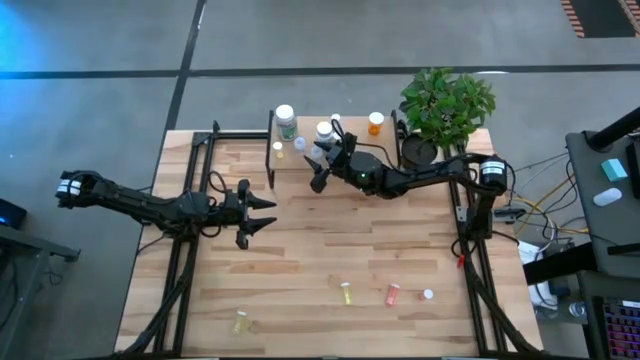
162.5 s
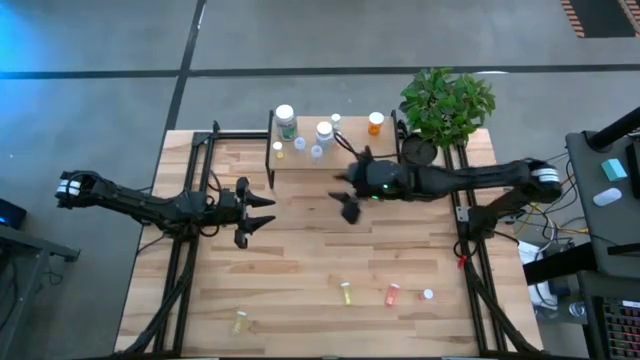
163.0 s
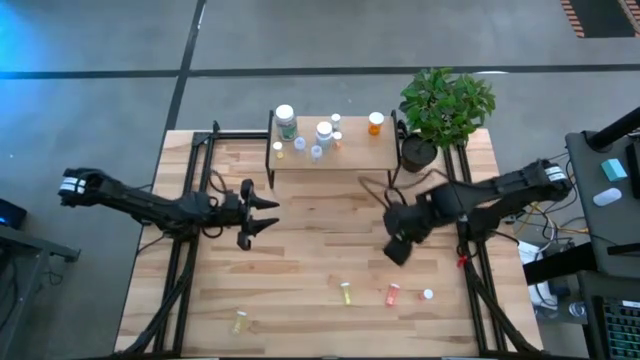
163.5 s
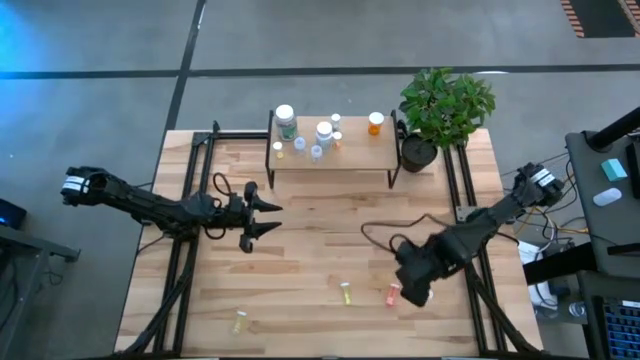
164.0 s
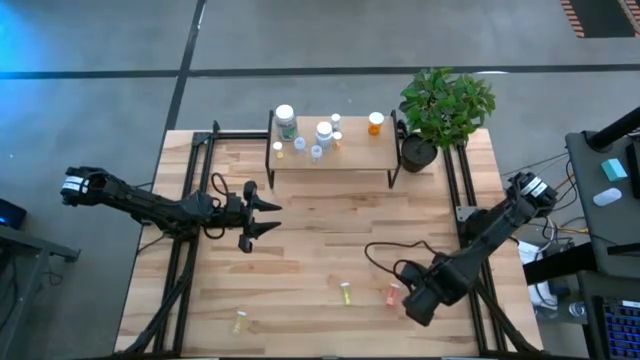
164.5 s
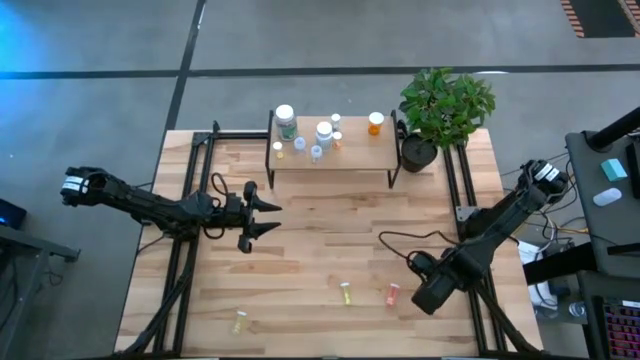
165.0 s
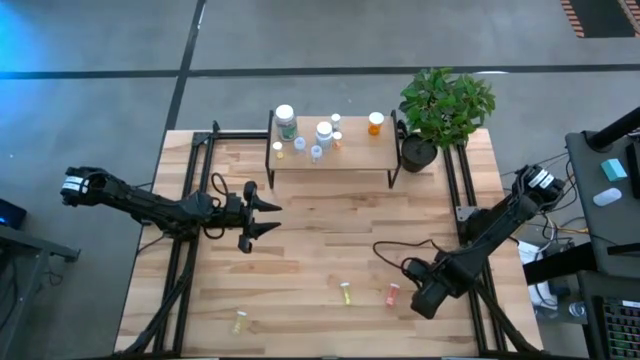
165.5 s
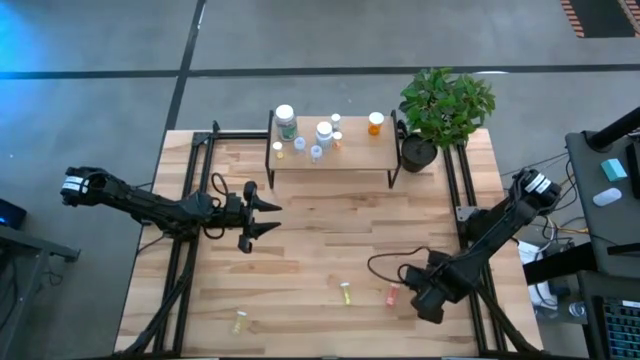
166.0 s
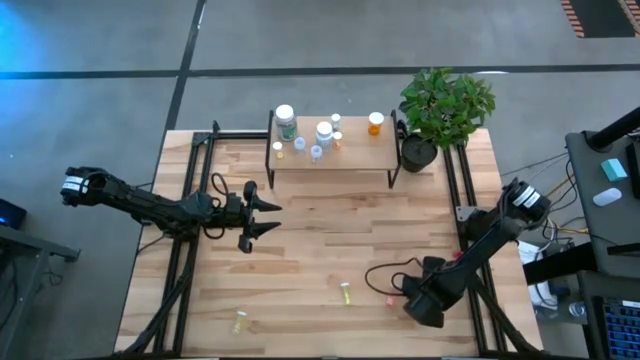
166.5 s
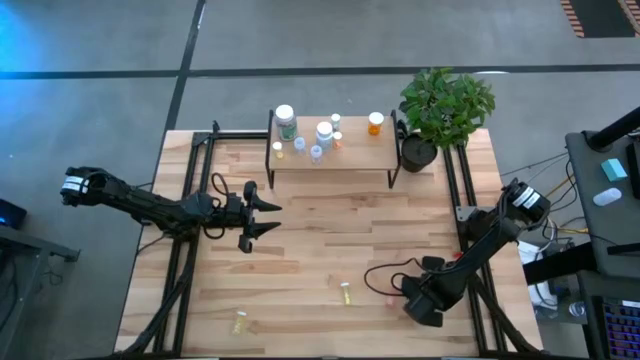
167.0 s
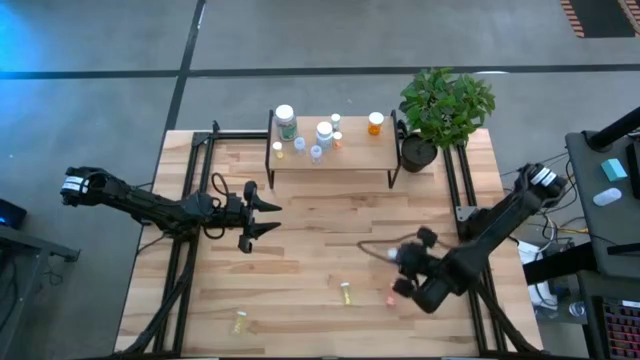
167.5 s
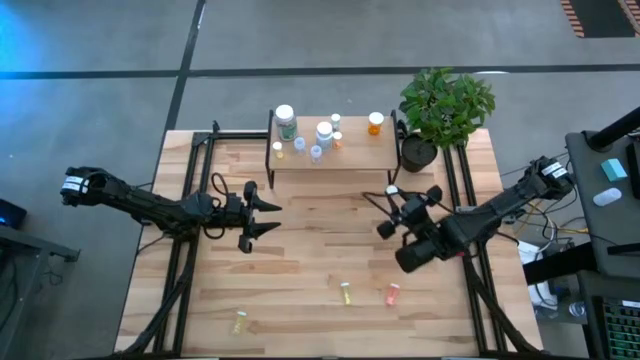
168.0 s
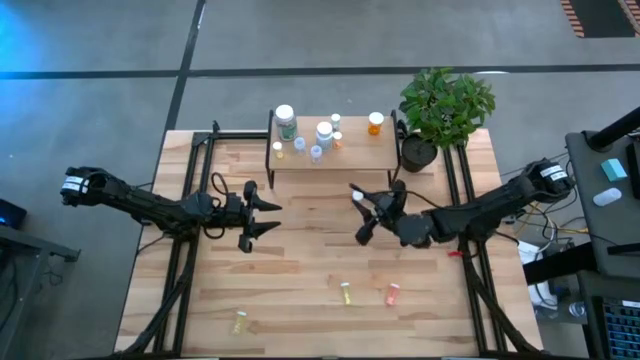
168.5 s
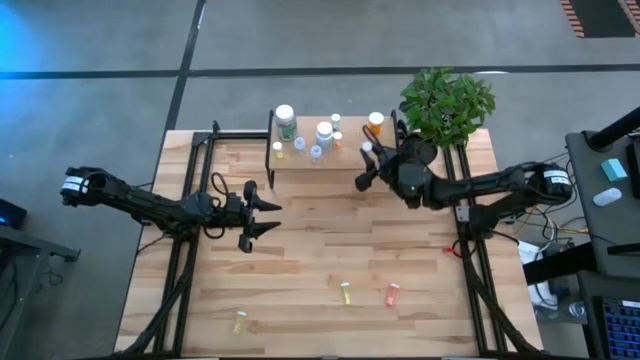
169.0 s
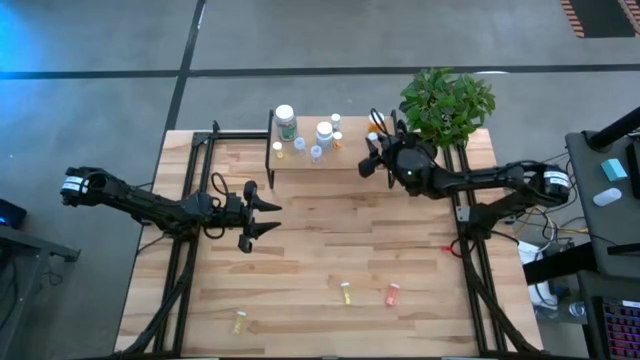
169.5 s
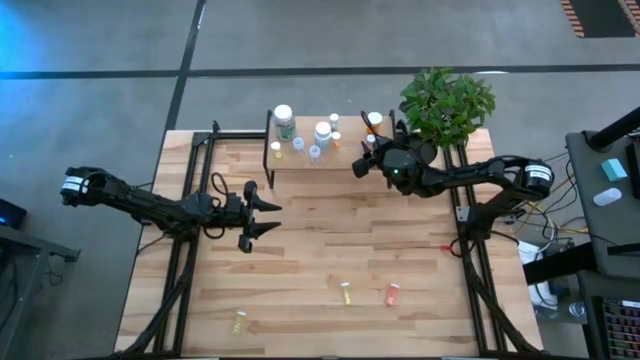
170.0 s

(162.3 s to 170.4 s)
Task: Pick and place medicine bottles onto shelf by color
Put the pink pill bottle on the shelf

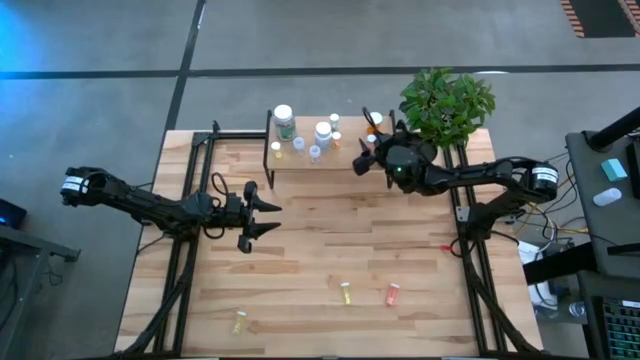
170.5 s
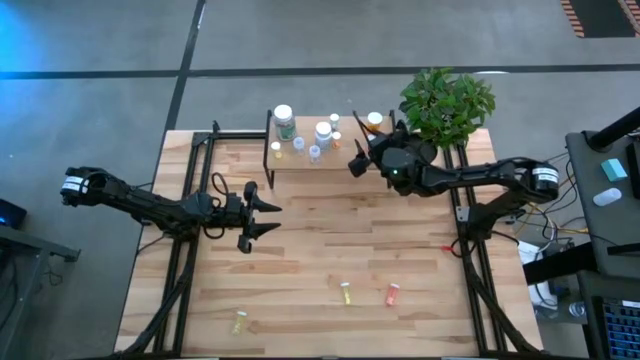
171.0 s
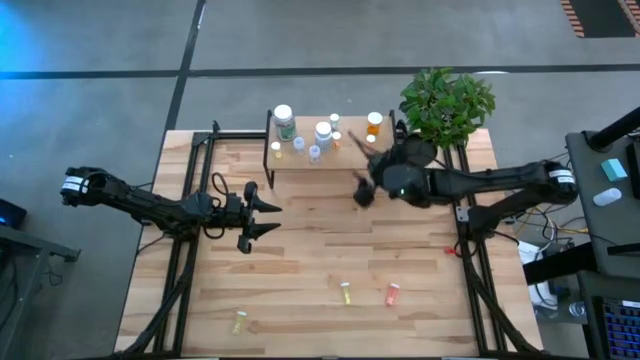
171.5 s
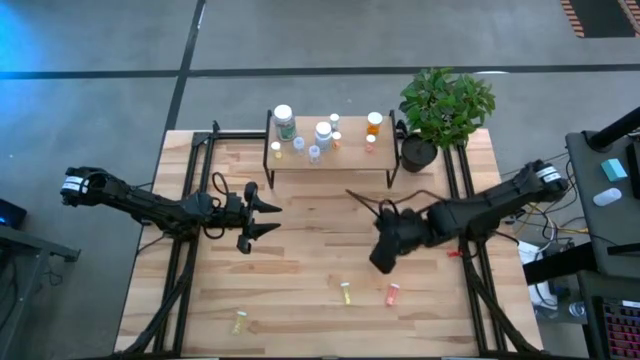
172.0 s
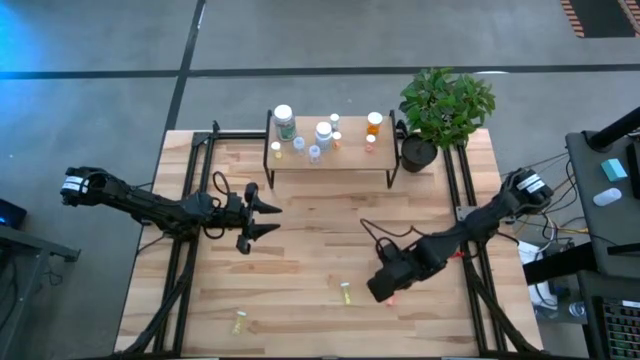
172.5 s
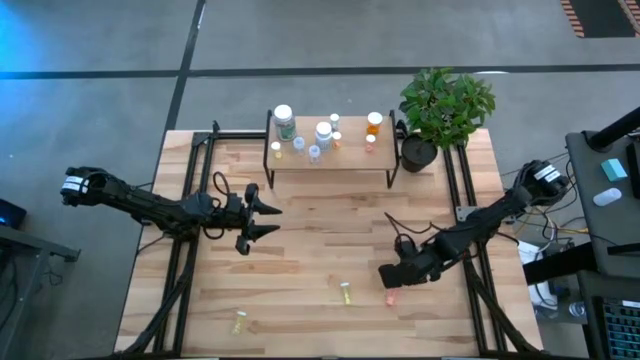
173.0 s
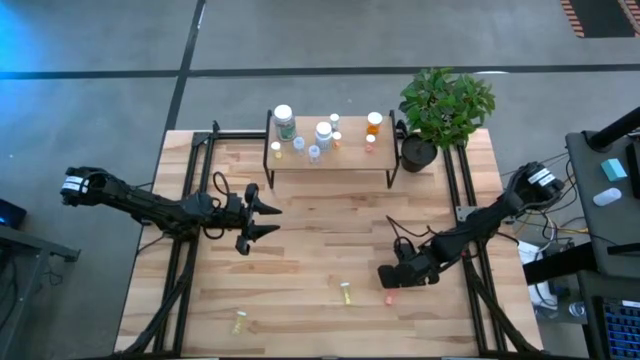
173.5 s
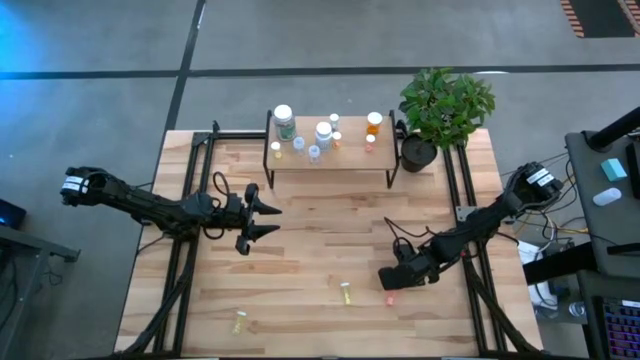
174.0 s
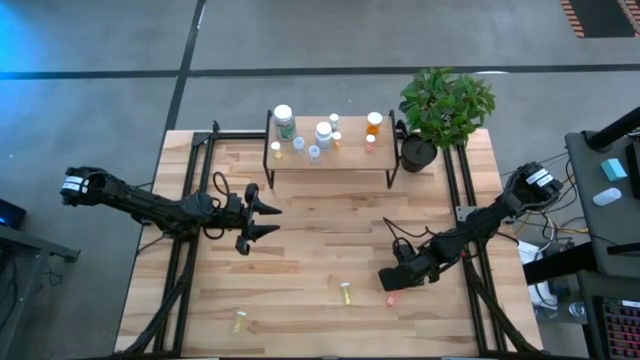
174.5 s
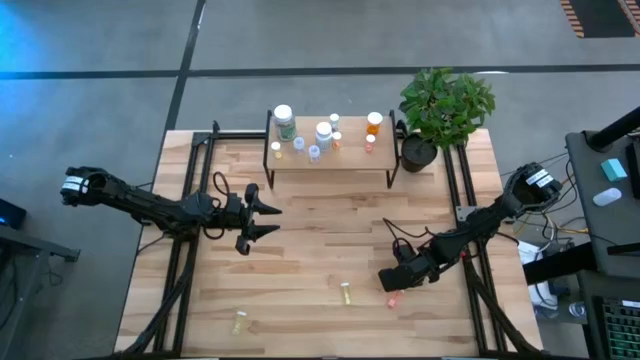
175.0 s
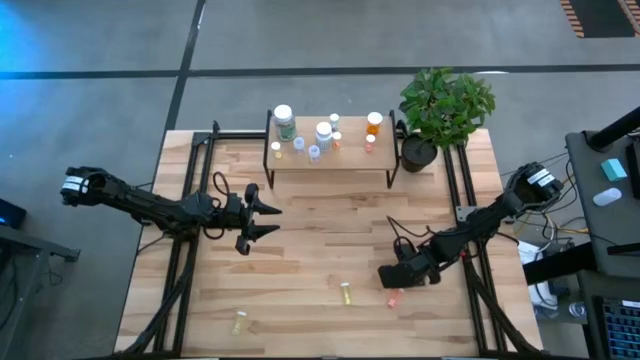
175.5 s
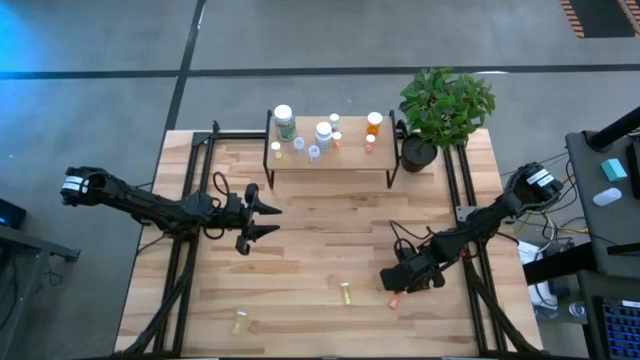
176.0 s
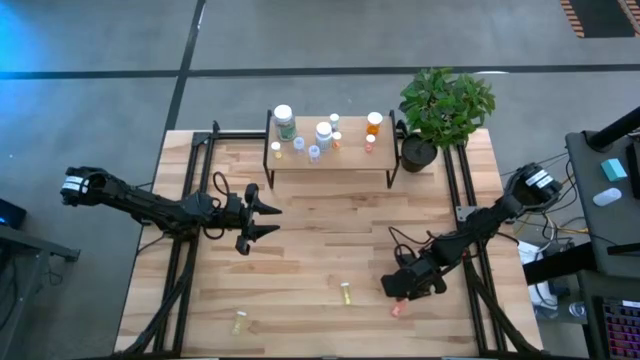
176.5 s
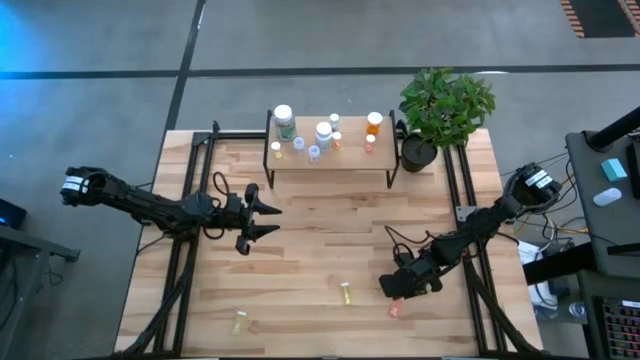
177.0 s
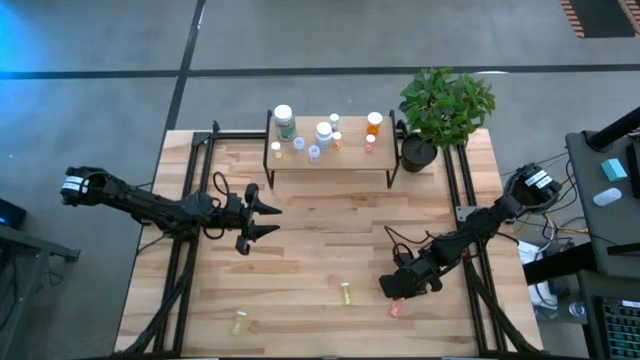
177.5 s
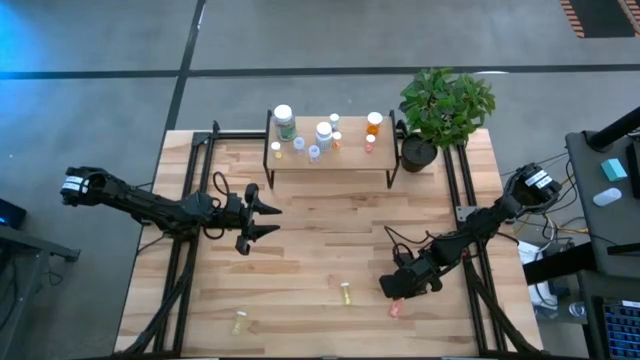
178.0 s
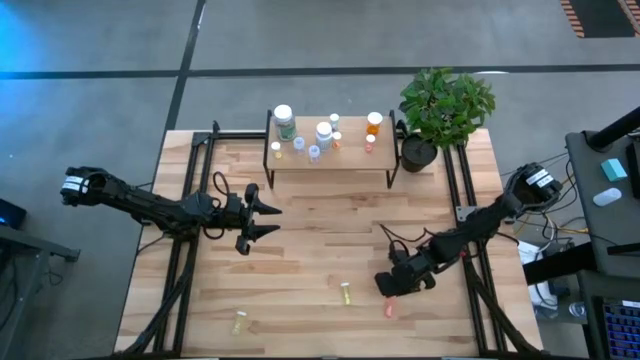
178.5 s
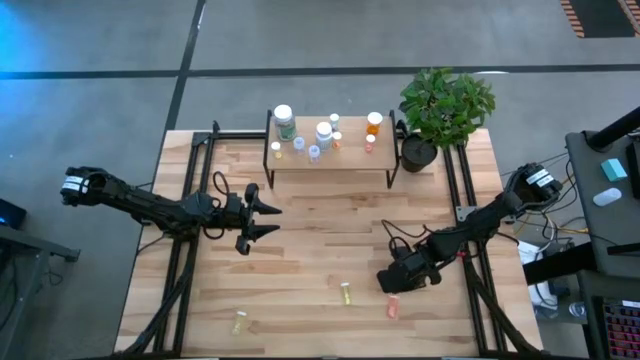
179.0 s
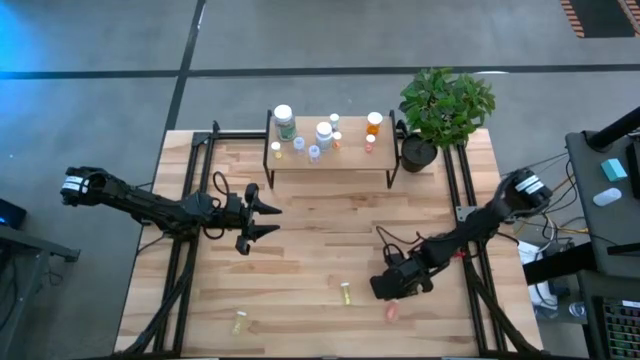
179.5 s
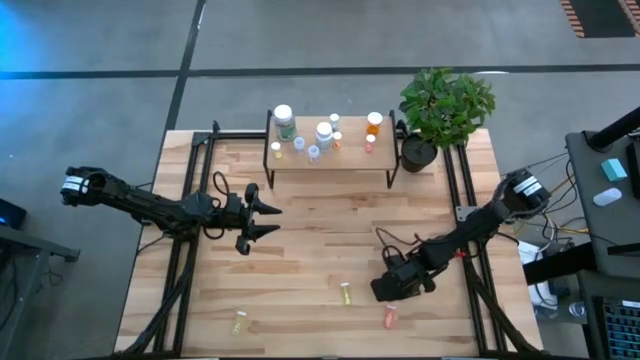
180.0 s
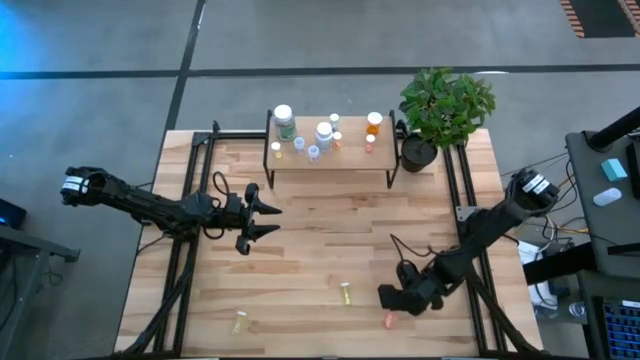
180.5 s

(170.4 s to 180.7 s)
Put the pink pill bottle on the shelf

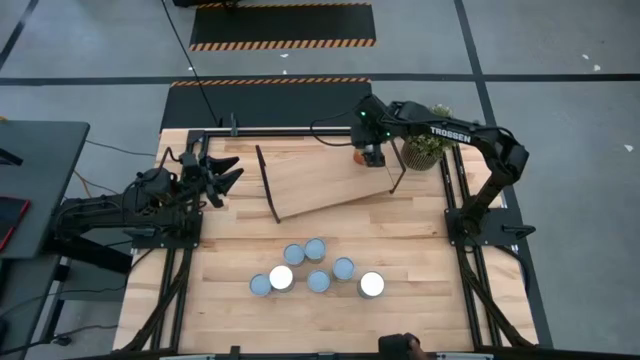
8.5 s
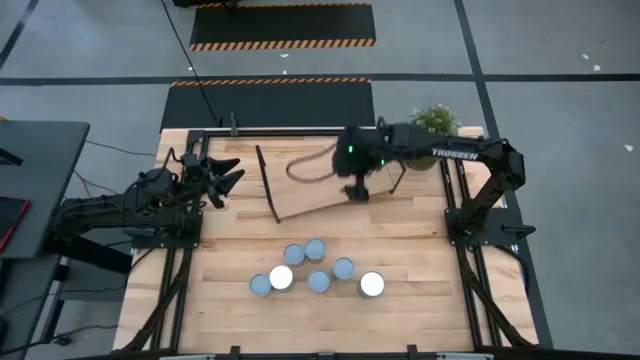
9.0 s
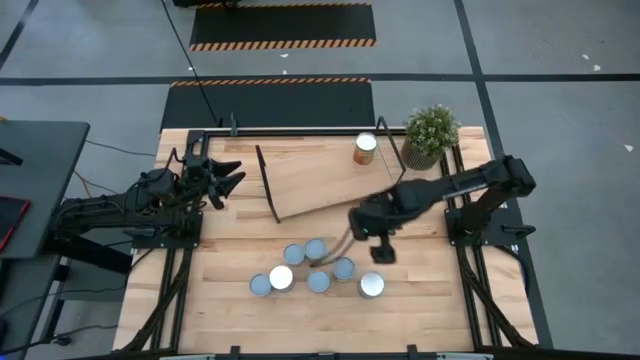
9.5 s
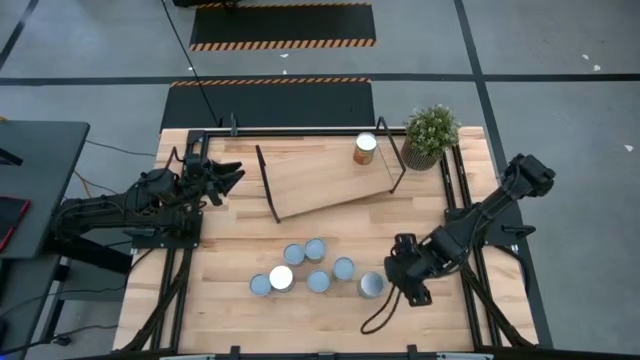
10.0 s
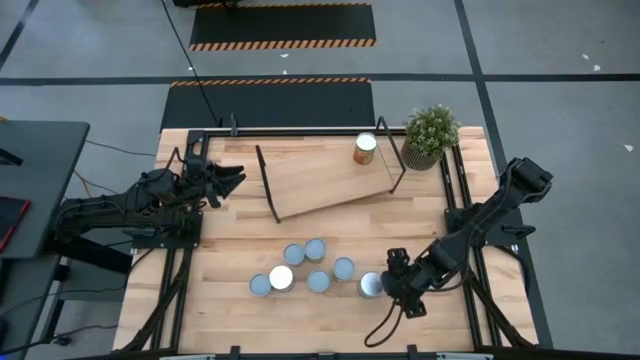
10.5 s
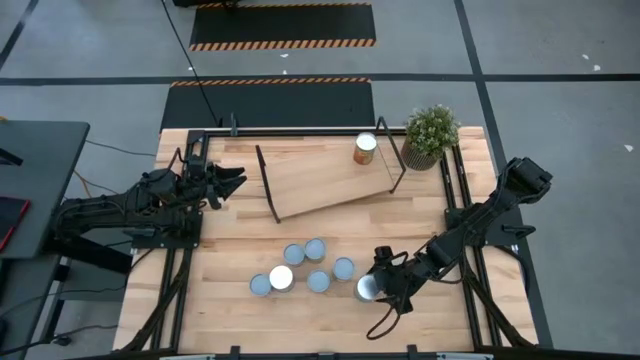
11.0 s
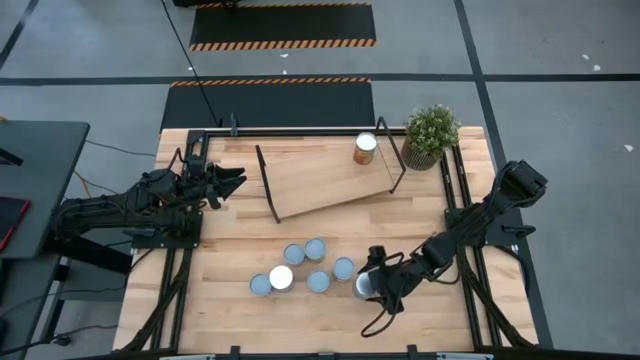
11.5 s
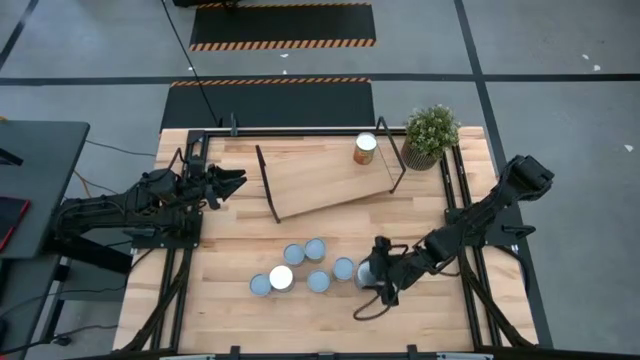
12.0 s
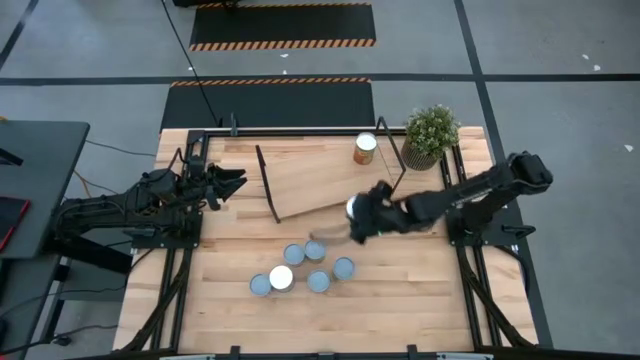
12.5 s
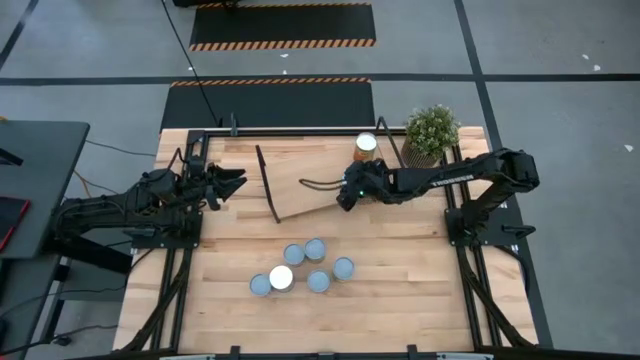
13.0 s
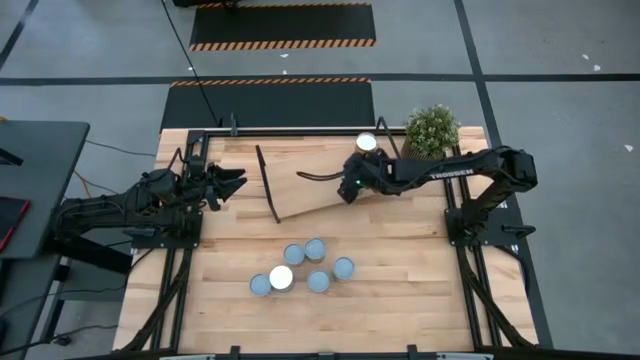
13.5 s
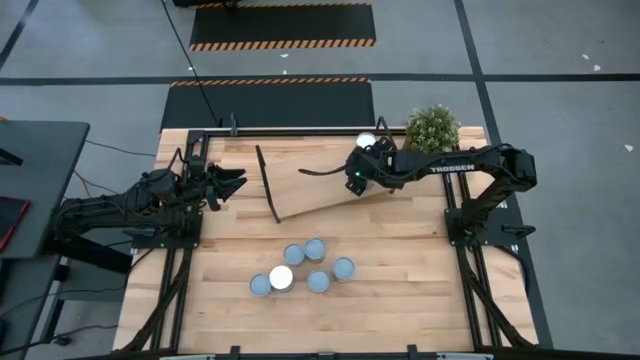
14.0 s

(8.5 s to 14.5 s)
Task: Pick and place cans onto a shelf
Put the canned cherries on the shelf
